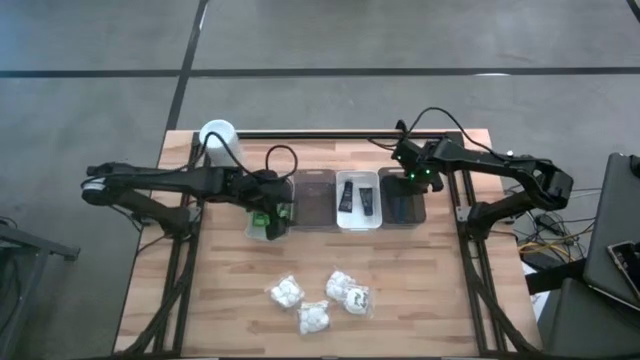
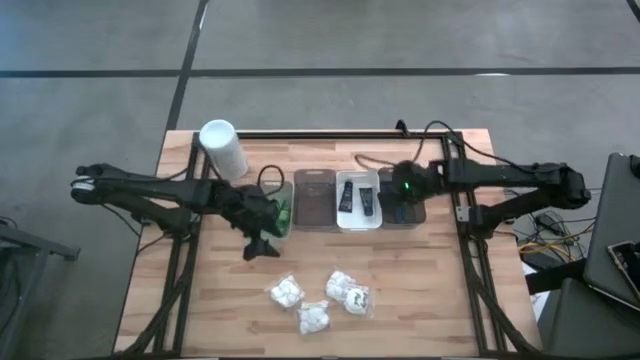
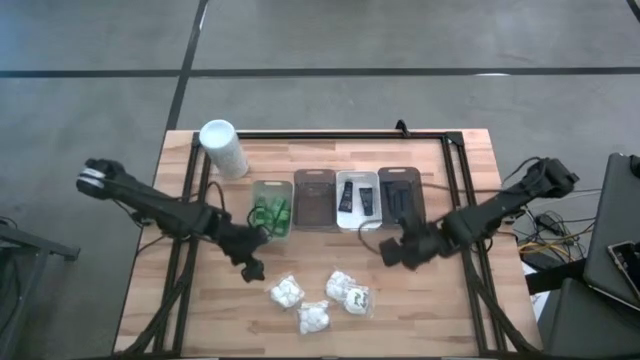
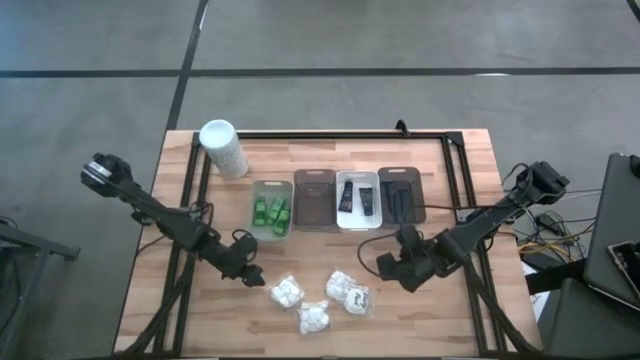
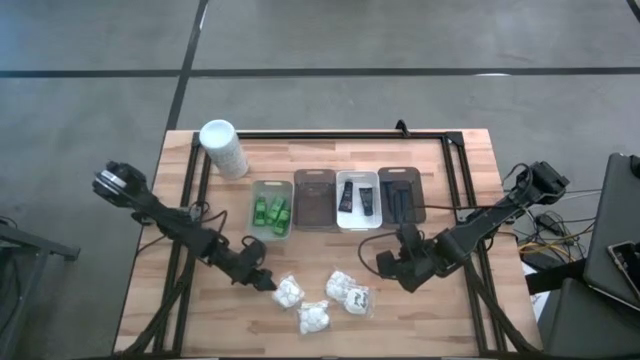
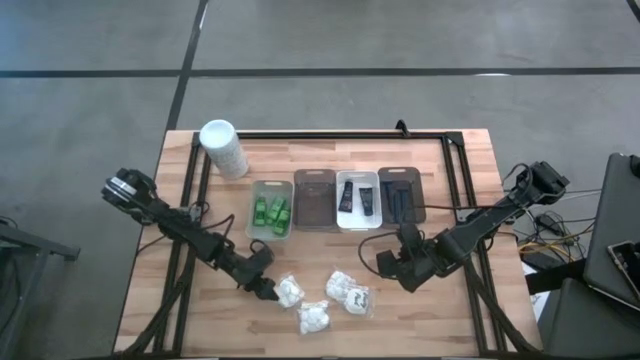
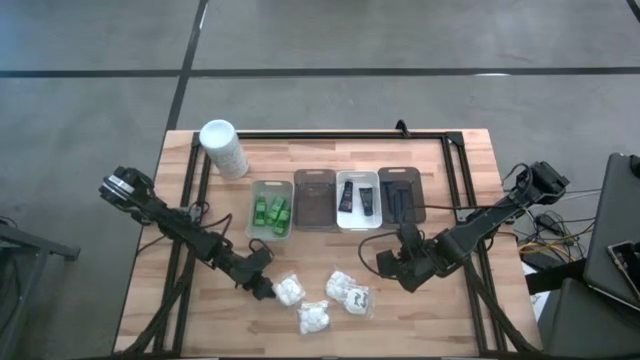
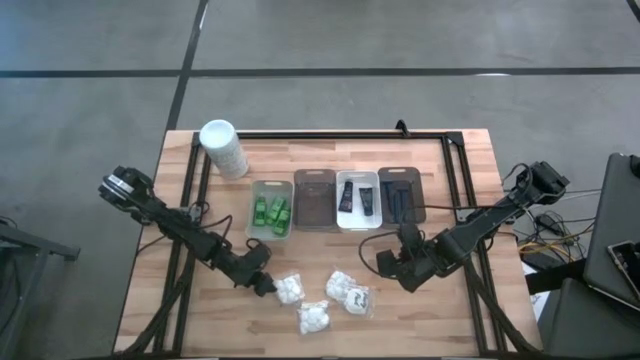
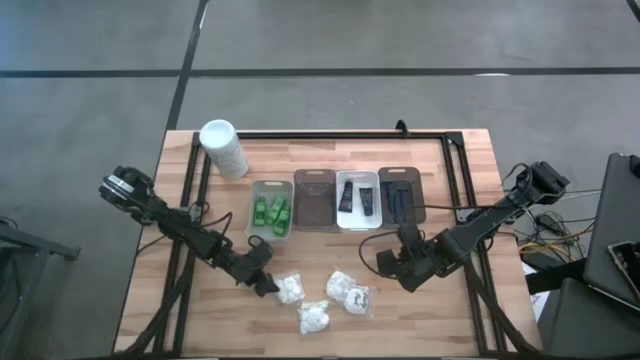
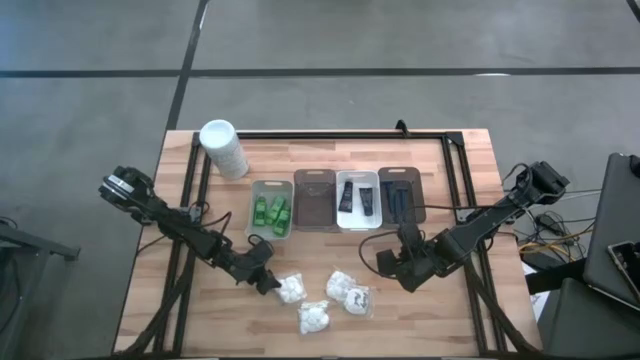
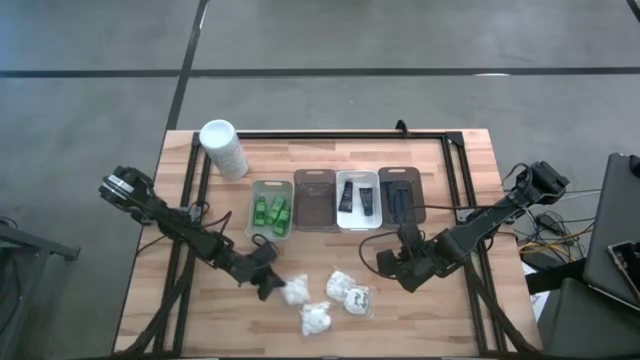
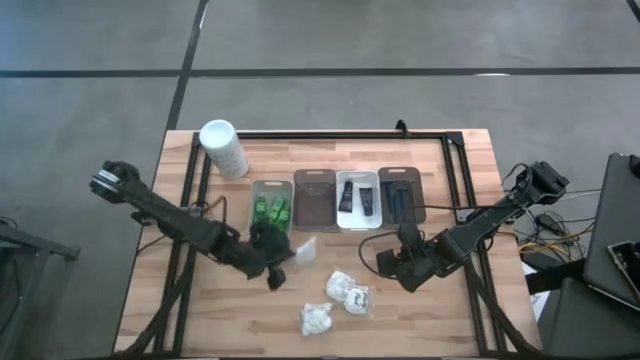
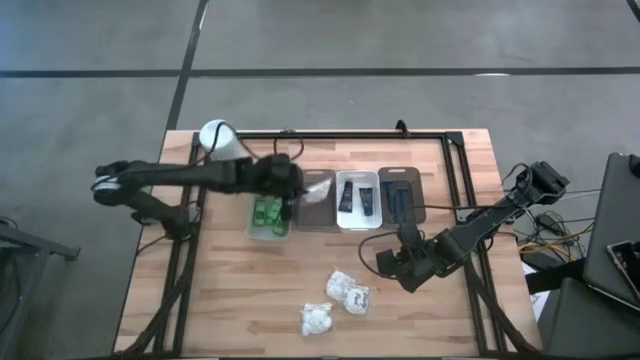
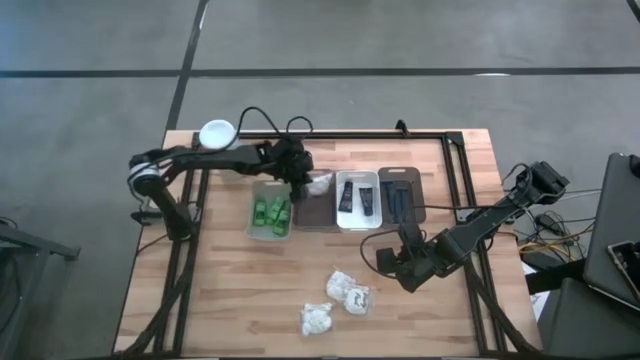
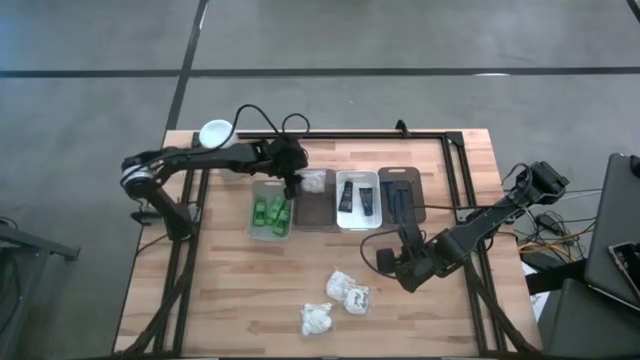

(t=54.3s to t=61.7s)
Task: Pick & Place Travel size toiletries
Put the top left cotton pack into the left black bin

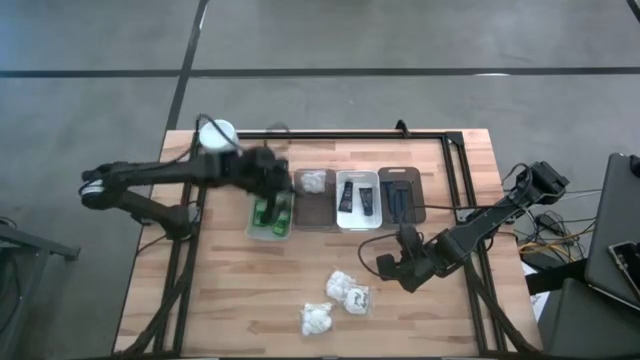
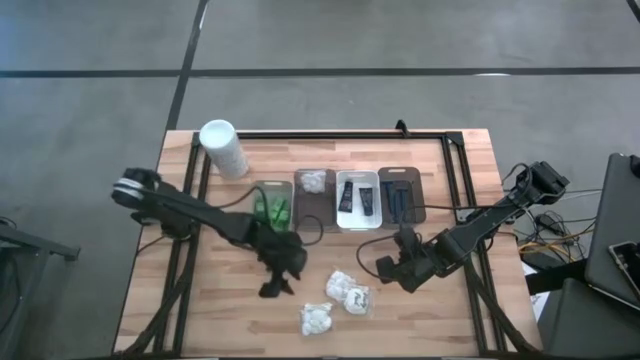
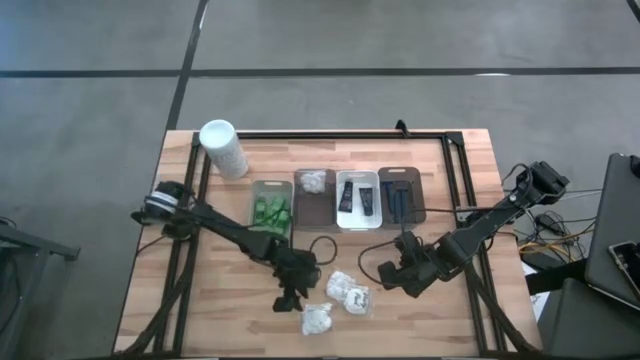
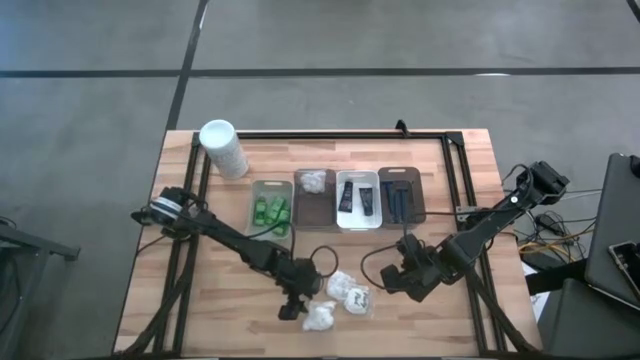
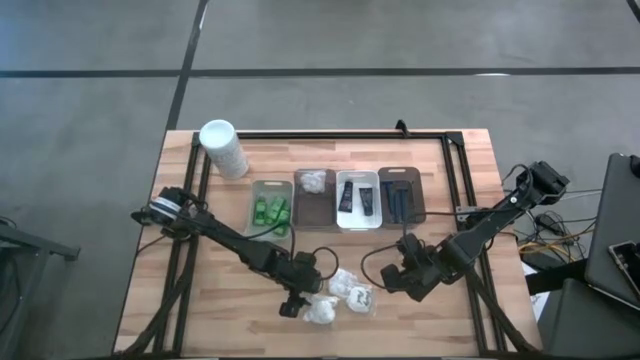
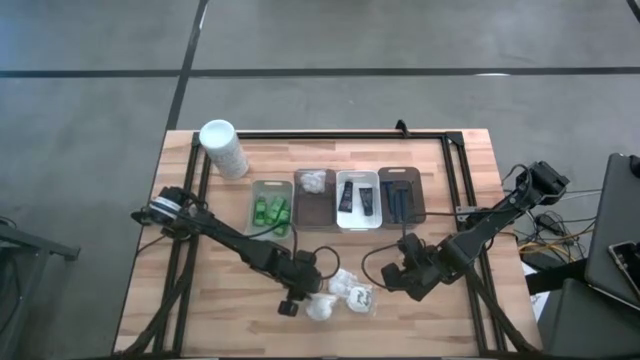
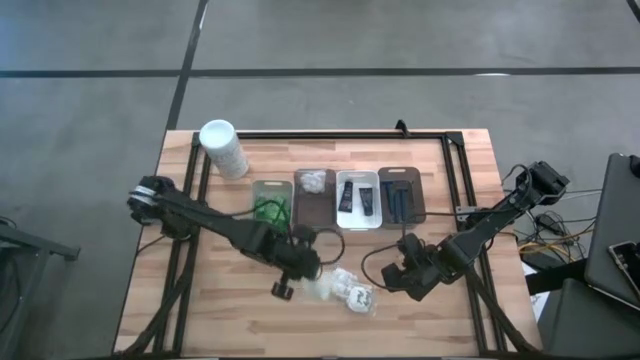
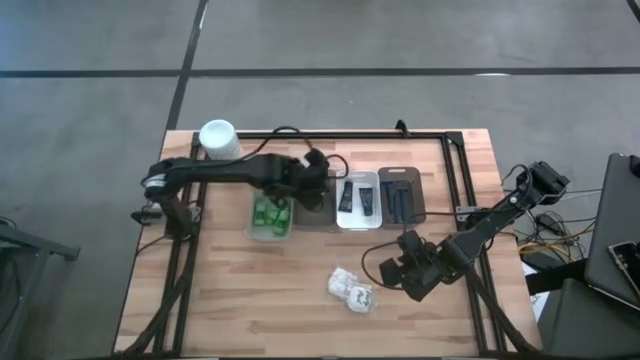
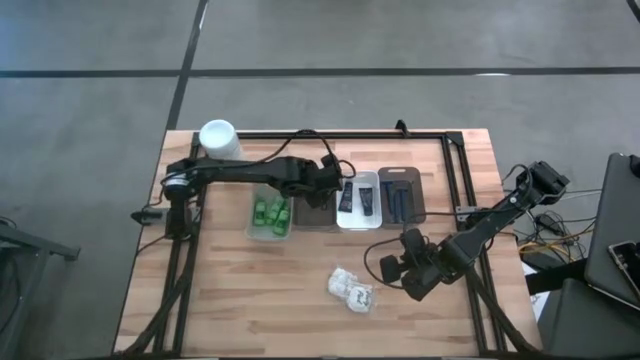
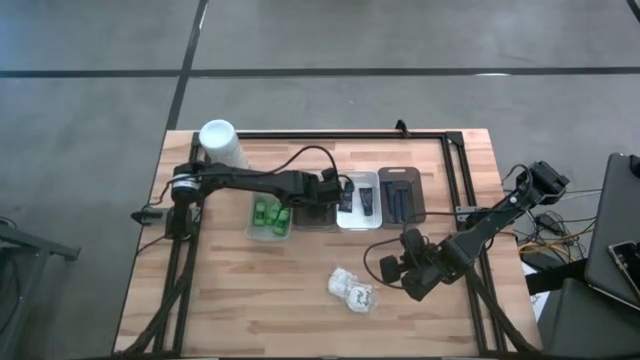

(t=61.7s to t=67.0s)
Put the bottom left cotton pack into the left black bin

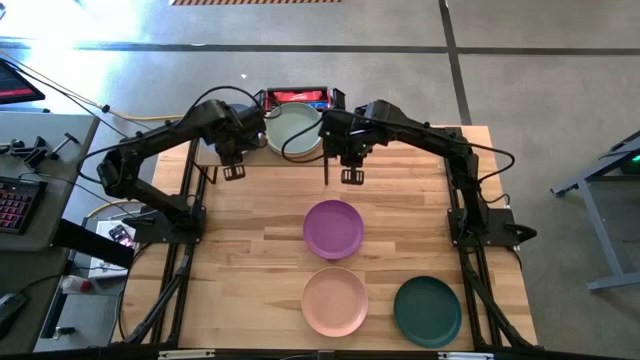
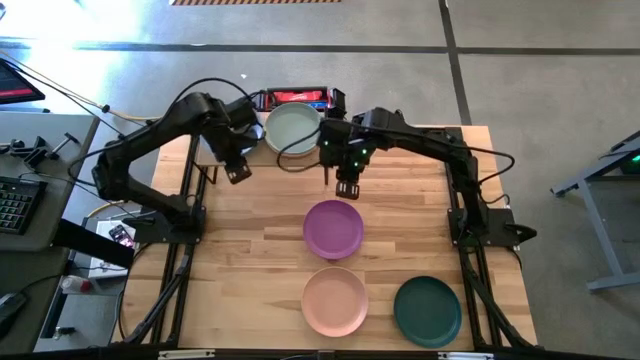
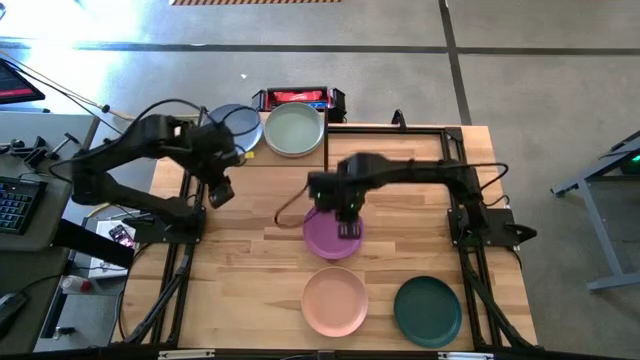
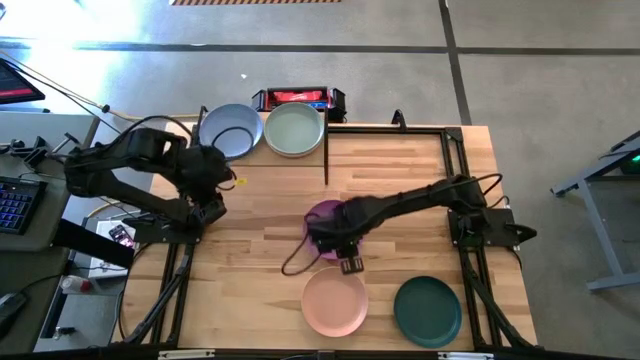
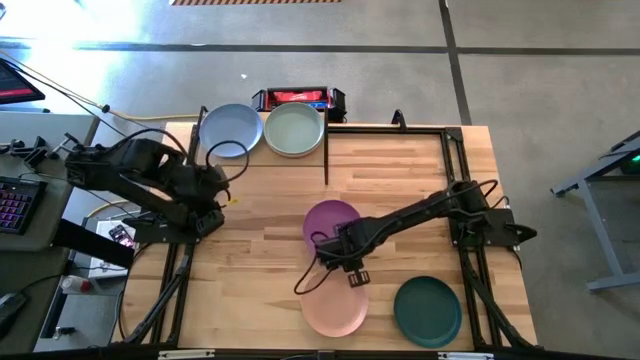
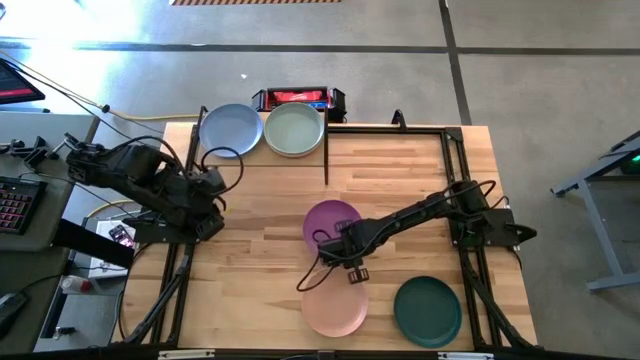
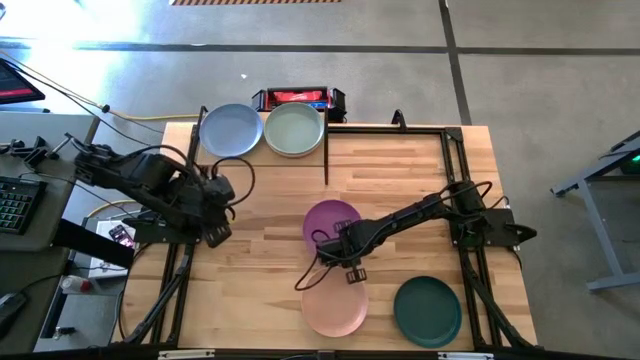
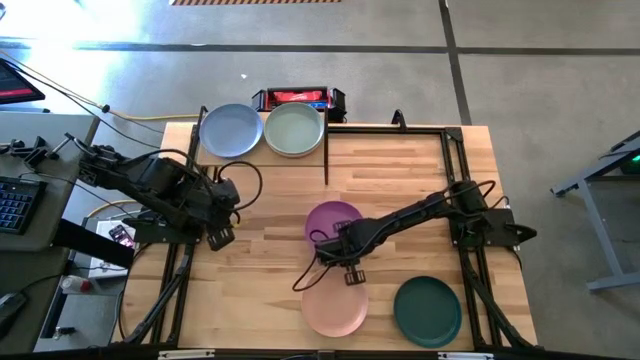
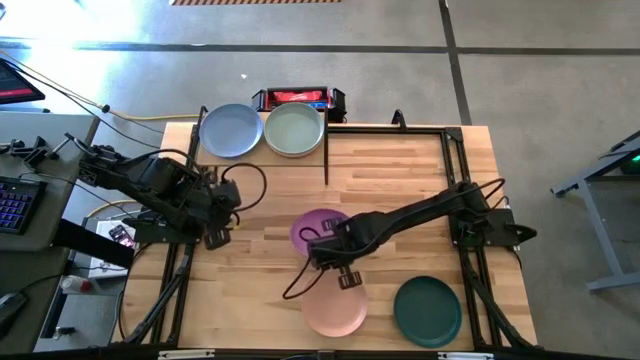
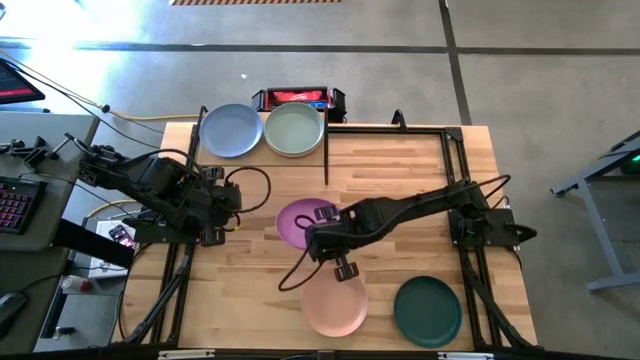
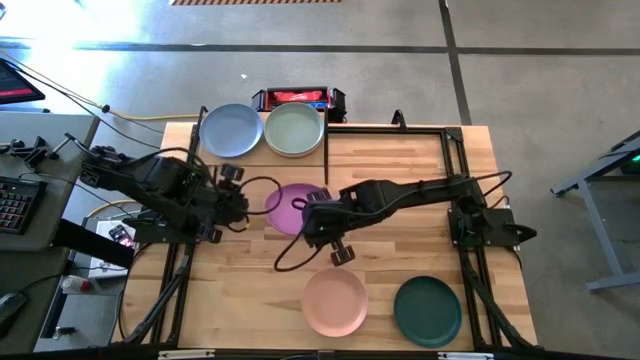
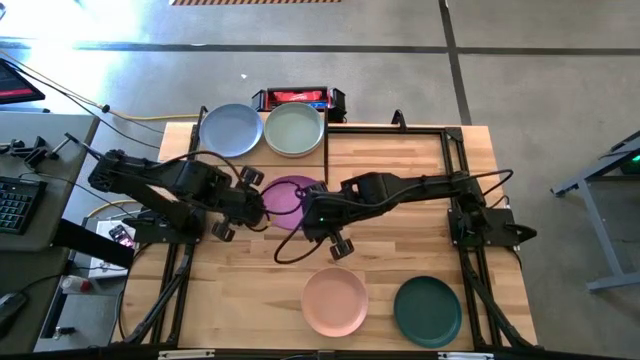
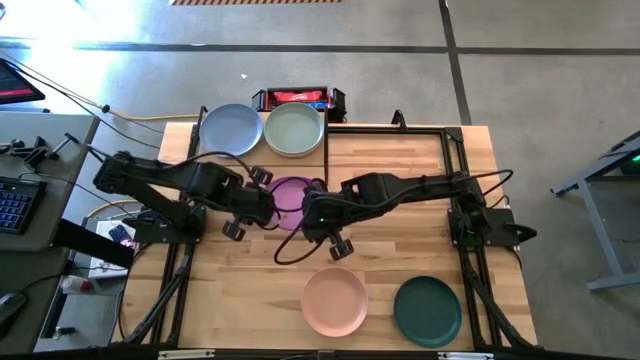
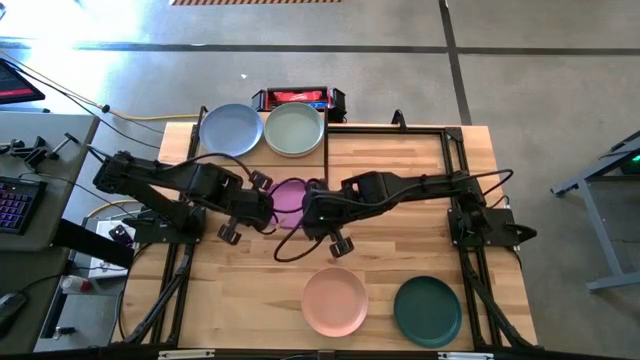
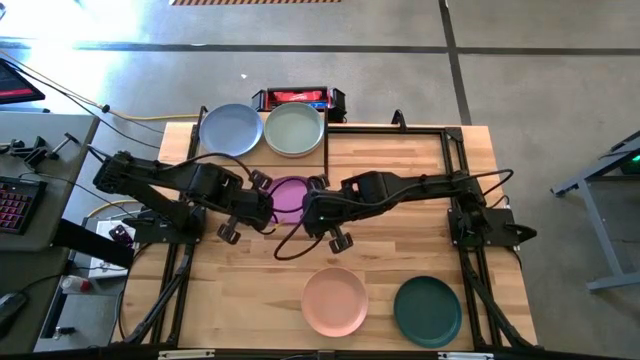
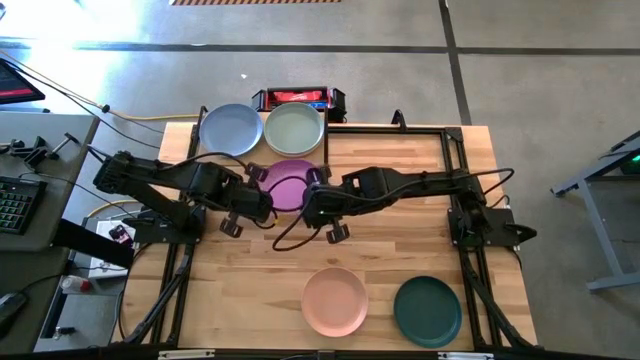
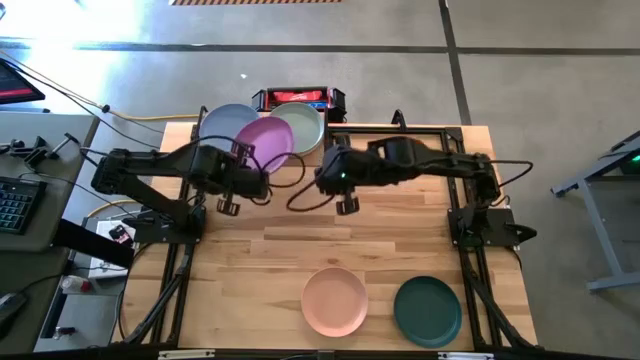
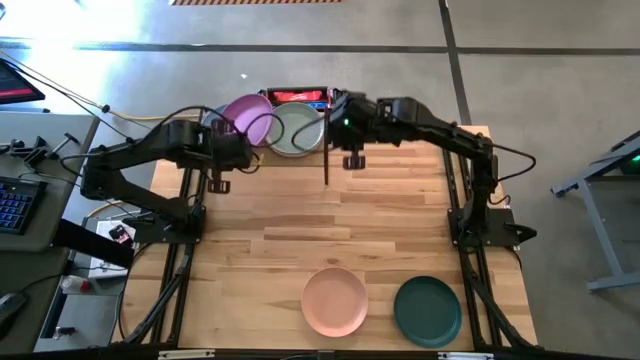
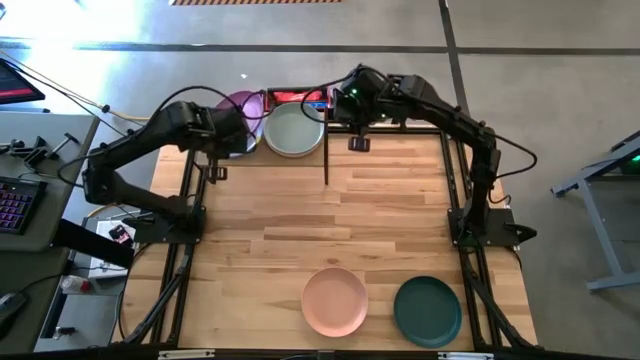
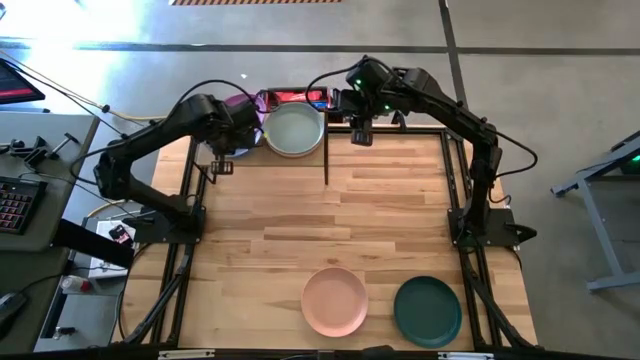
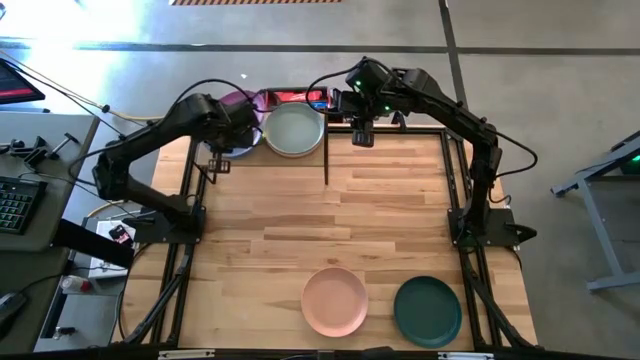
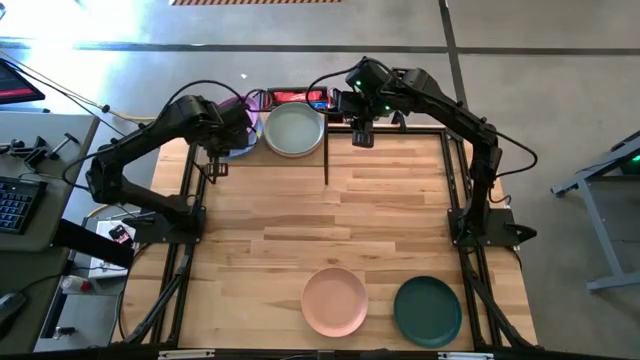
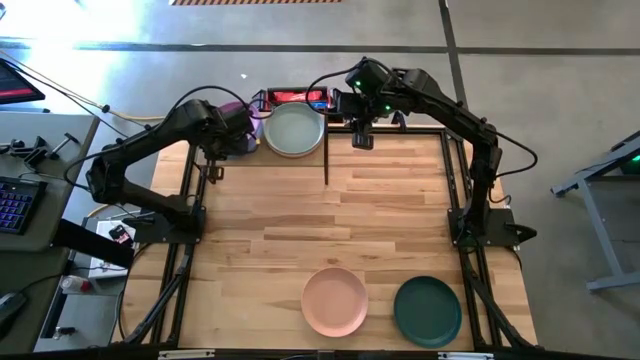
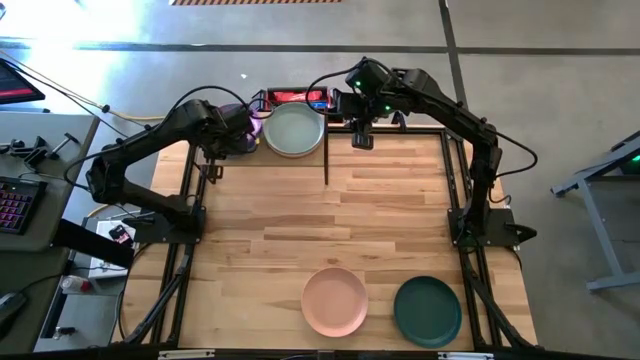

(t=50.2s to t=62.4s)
Task: Place and stack plates onto a shelf
Stack the violet plate on top of the blue plate on the shelf
